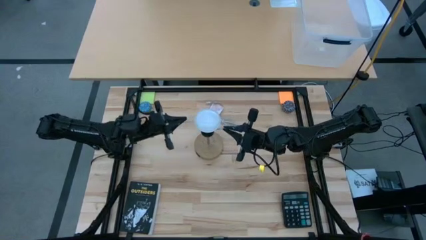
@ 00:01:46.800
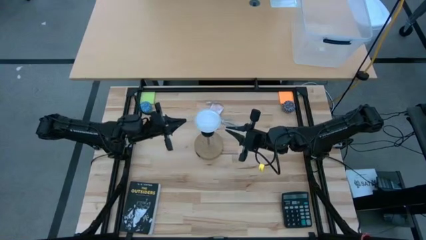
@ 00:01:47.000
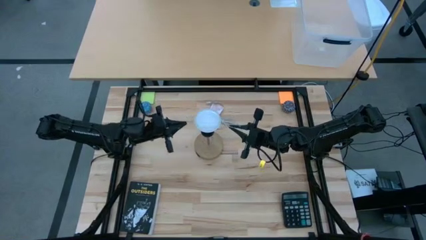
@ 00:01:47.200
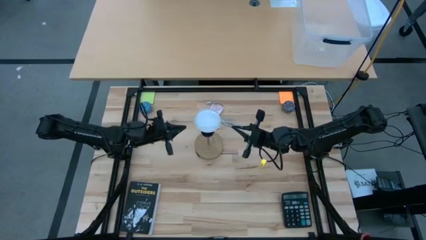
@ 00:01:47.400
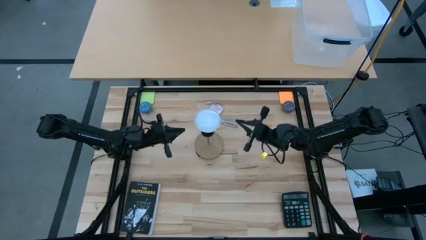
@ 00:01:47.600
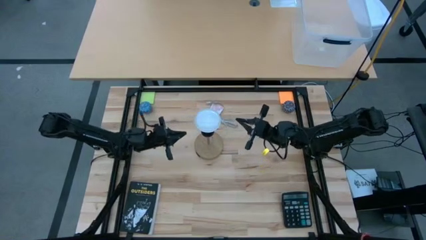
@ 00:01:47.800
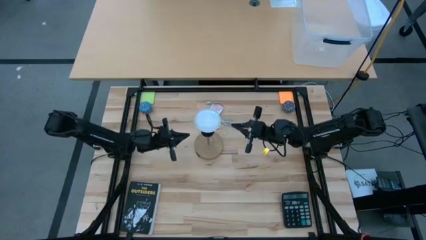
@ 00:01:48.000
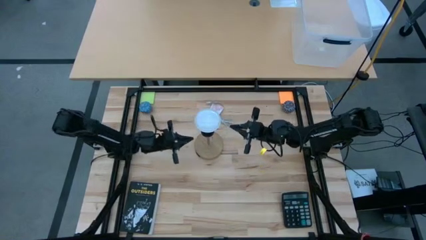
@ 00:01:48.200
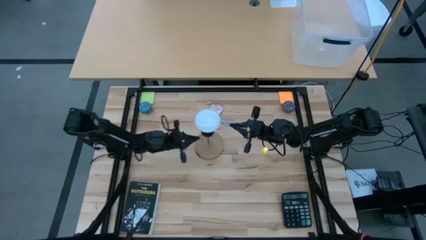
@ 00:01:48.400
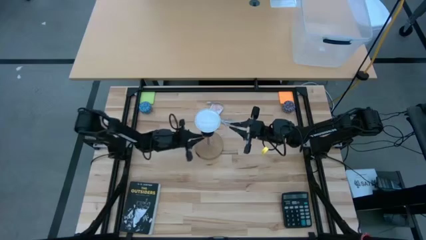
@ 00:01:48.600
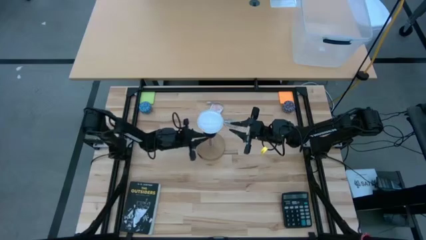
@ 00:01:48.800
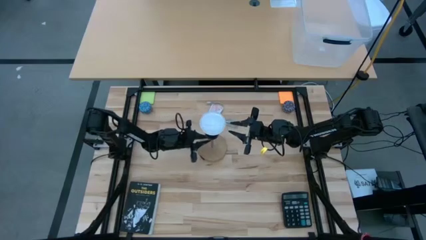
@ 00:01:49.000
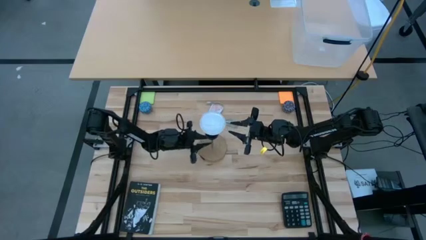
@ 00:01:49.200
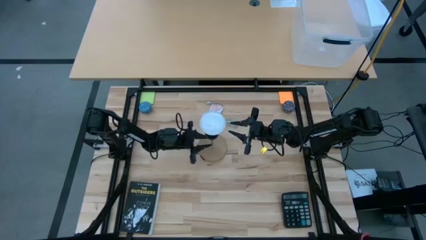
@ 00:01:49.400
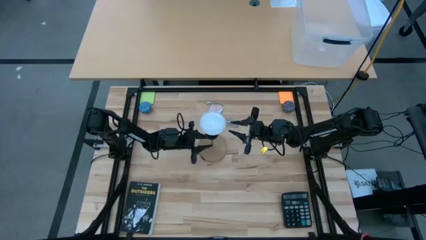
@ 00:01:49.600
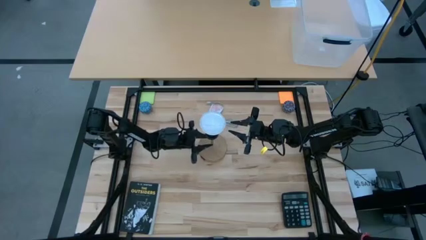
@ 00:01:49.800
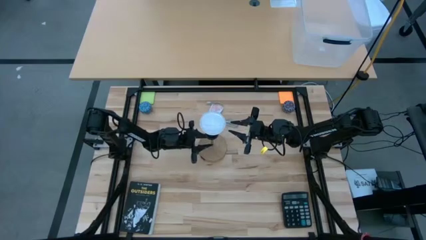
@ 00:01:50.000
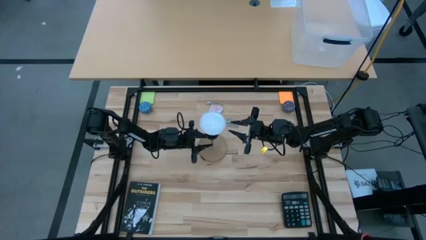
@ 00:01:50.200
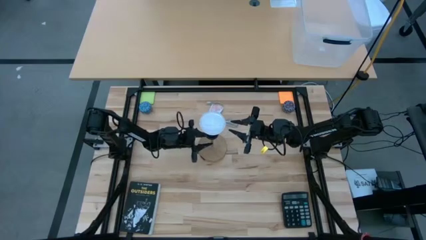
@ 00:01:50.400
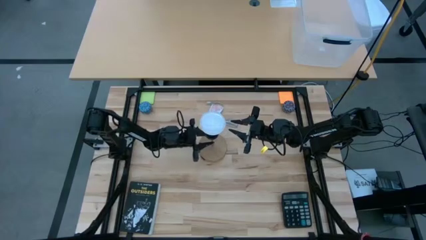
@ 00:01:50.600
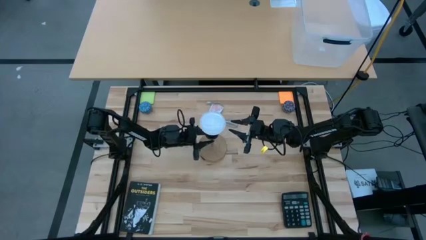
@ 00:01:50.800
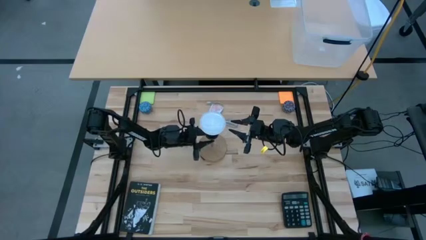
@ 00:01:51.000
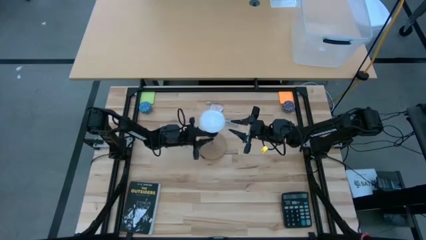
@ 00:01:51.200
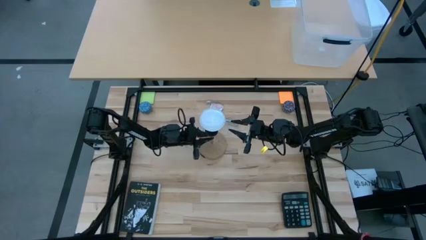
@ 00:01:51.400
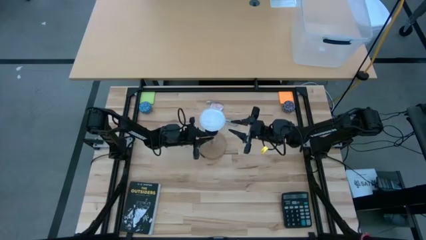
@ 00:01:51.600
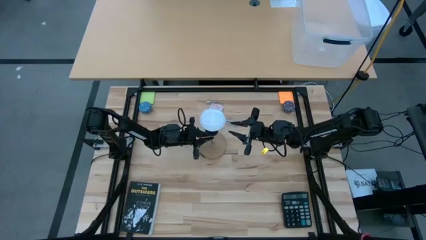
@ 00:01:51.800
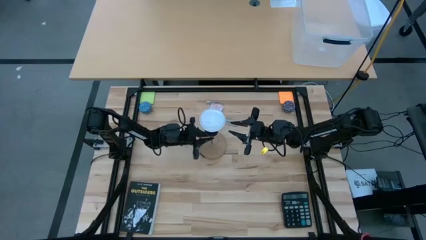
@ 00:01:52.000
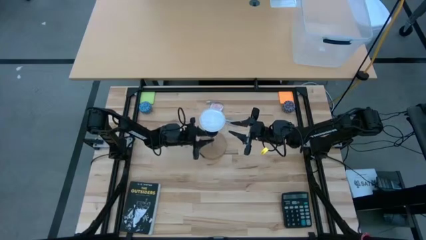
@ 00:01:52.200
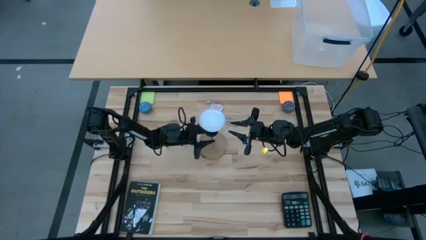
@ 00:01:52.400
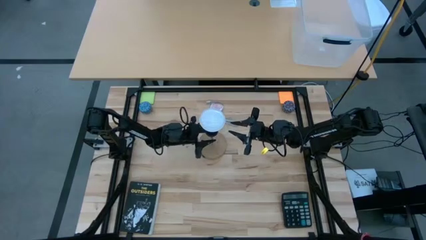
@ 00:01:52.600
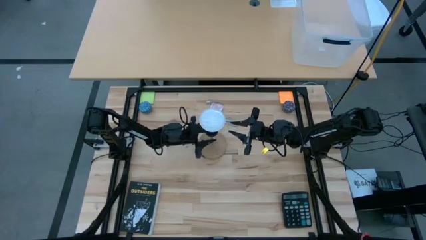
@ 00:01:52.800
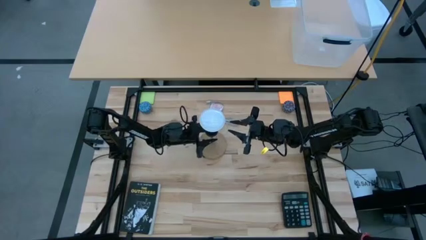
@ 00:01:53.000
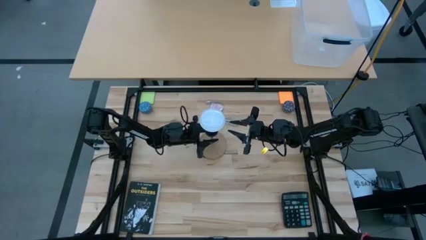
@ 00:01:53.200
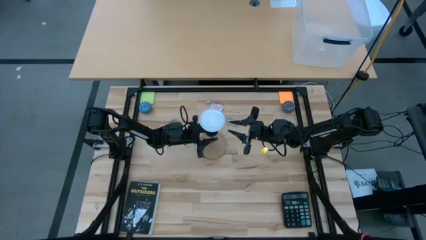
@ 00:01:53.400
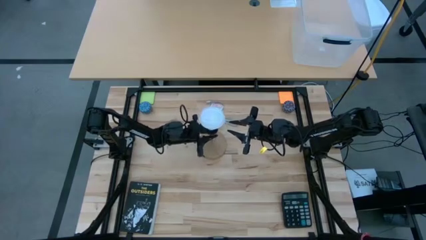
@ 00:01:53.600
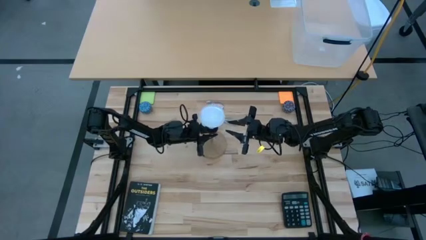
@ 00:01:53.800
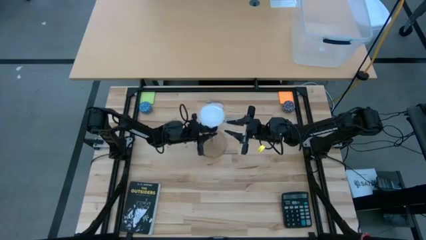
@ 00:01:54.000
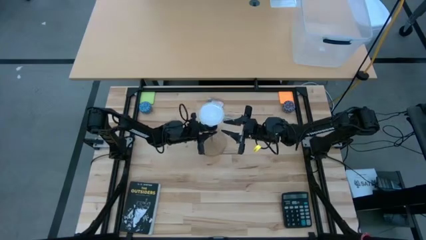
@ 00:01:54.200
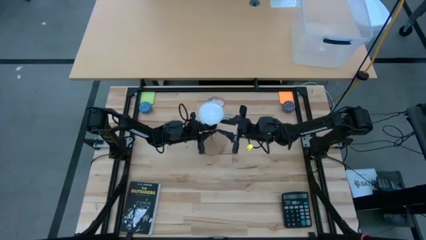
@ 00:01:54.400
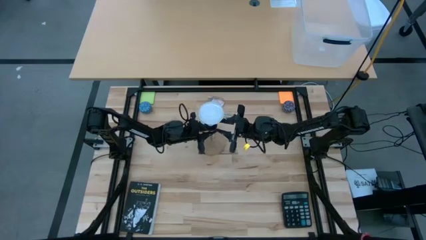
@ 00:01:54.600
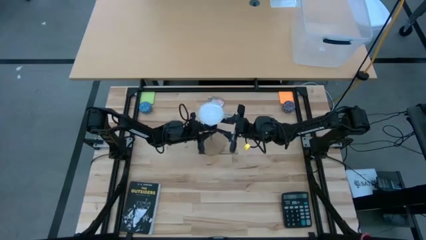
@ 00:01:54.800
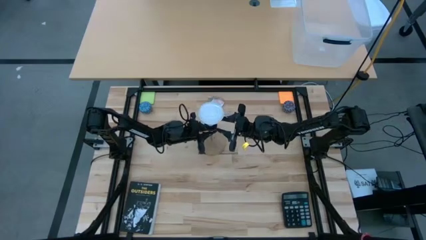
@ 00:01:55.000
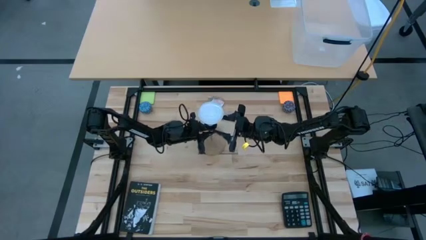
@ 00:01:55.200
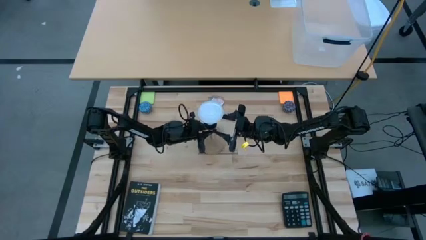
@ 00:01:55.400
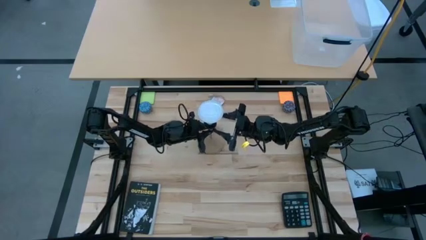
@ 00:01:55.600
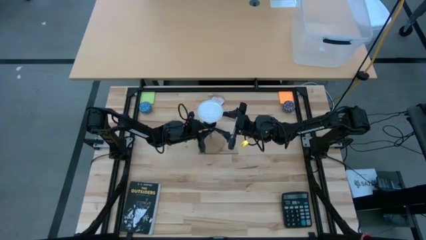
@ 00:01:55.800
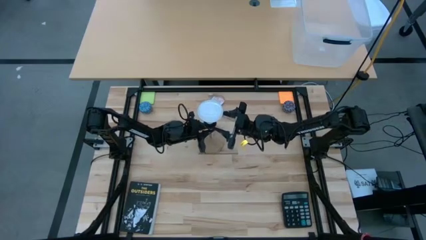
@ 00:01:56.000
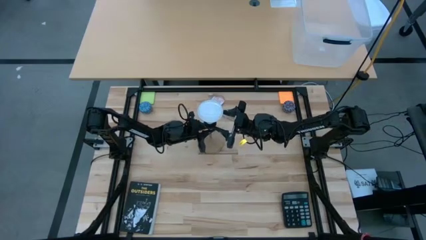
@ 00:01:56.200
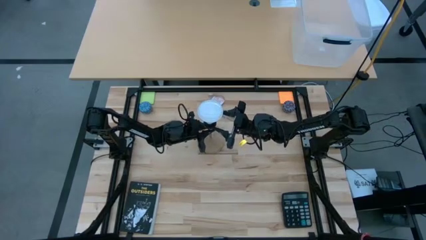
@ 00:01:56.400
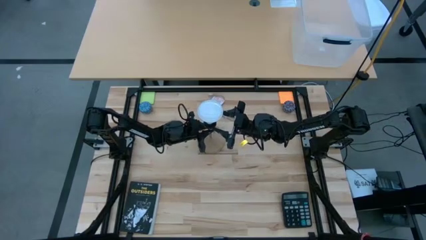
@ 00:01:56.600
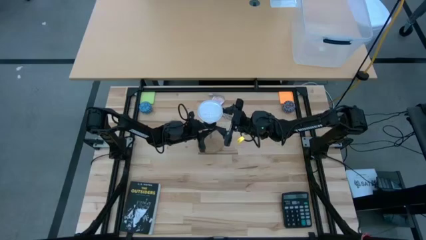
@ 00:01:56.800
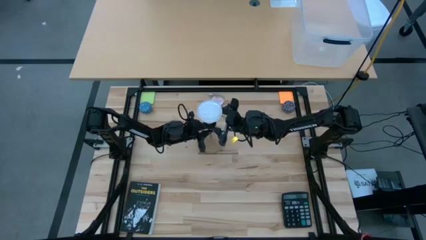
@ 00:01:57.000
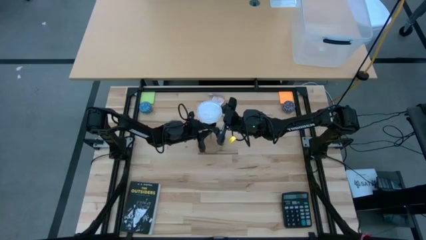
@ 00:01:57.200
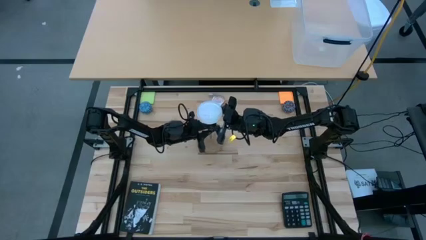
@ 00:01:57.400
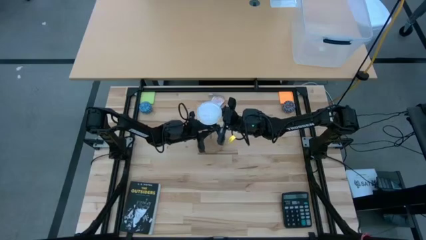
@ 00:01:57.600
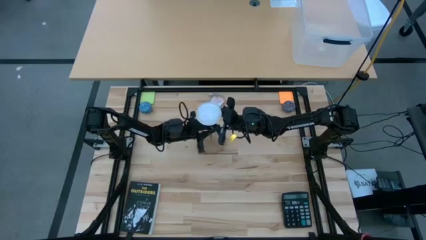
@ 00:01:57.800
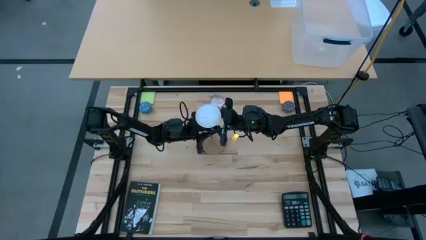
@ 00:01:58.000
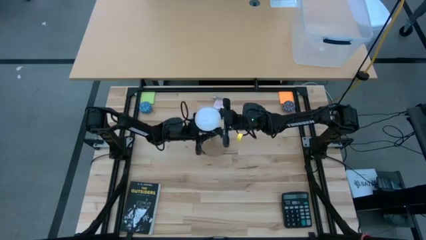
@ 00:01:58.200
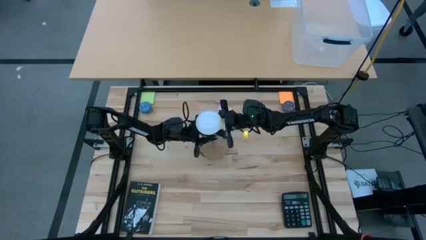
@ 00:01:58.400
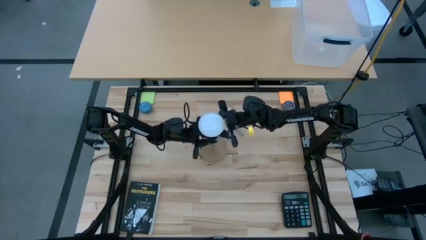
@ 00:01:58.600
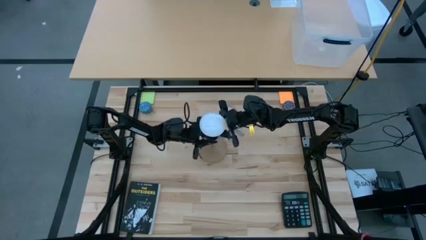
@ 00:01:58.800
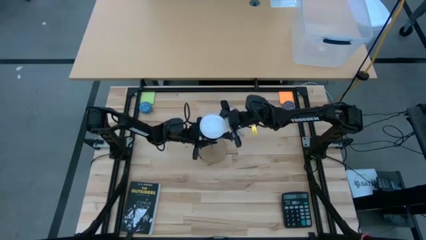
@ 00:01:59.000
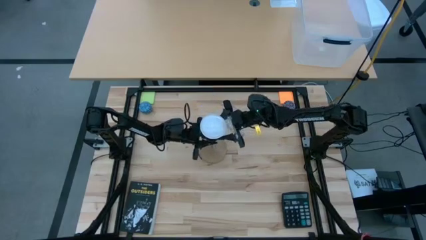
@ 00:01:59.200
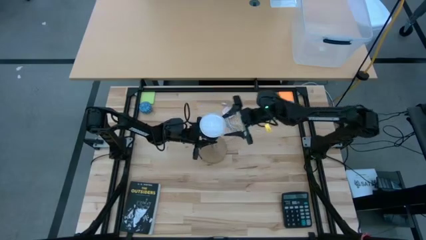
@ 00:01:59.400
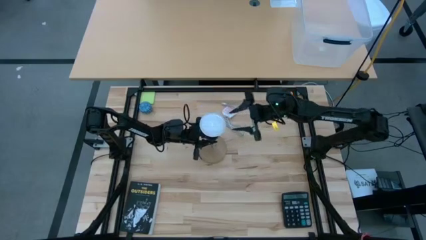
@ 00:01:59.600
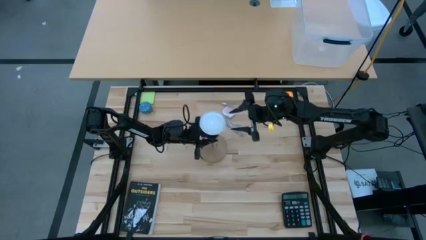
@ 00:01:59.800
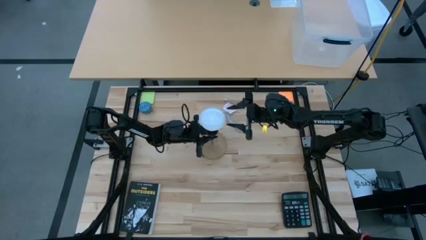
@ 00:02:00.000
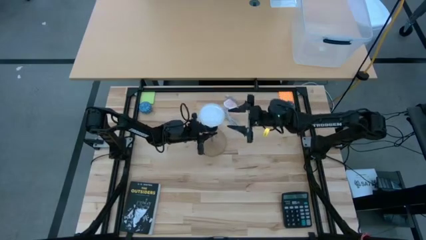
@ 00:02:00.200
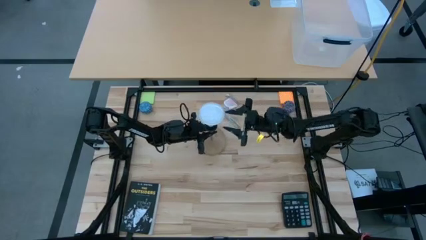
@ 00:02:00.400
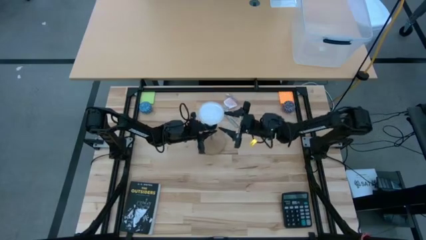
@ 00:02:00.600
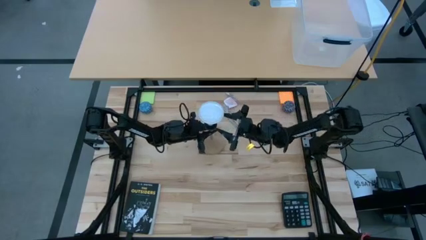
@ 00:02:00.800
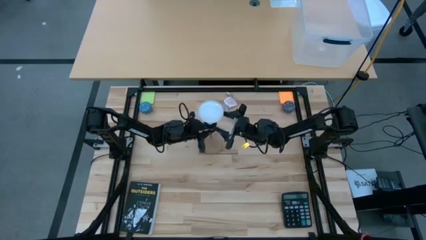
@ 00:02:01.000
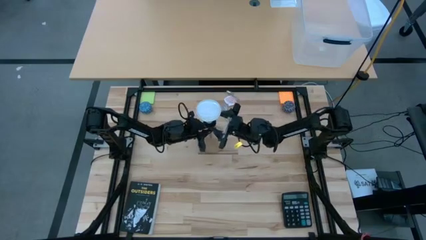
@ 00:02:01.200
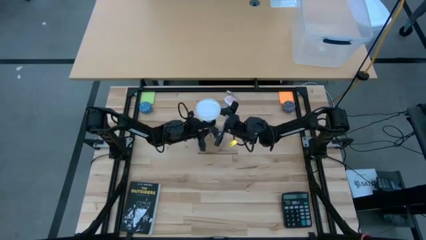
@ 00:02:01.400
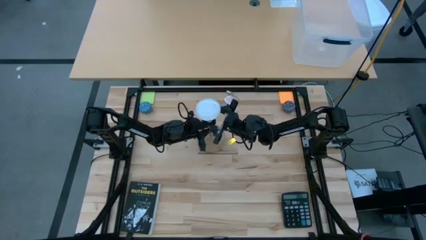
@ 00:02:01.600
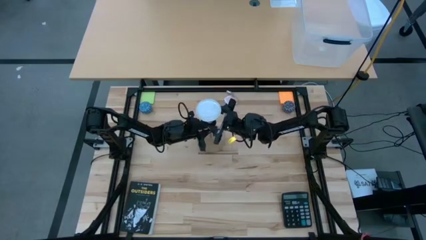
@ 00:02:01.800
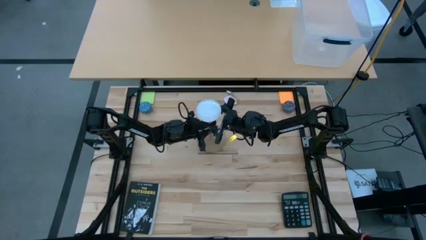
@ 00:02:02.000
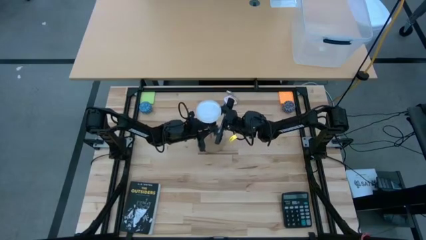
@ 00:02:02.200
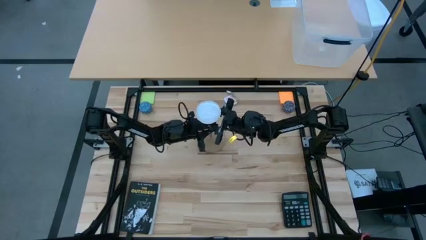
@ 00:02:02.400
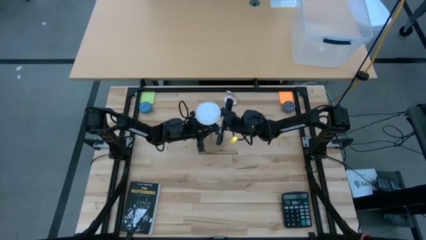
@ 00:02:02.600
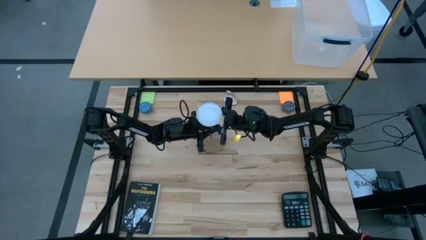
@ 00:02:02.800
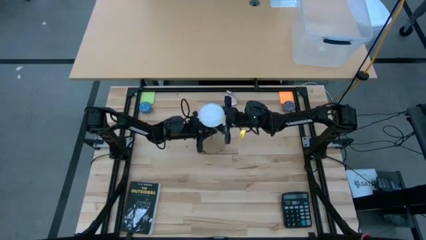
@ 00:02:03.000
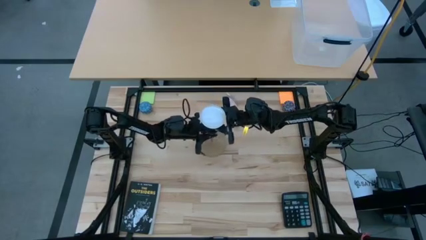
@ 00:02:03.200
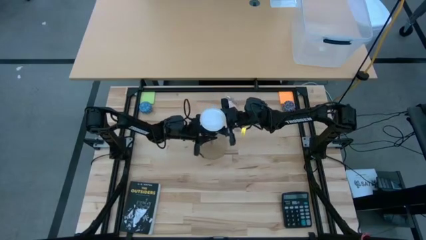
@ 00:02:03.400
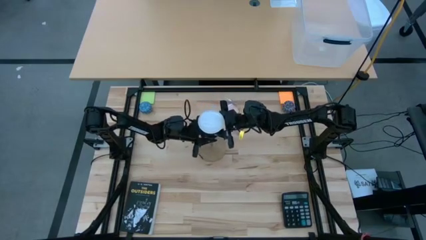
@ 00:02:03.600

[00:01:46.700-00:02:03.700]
Task: Screw lightbulb
Remove the lightbulb from the lamp
